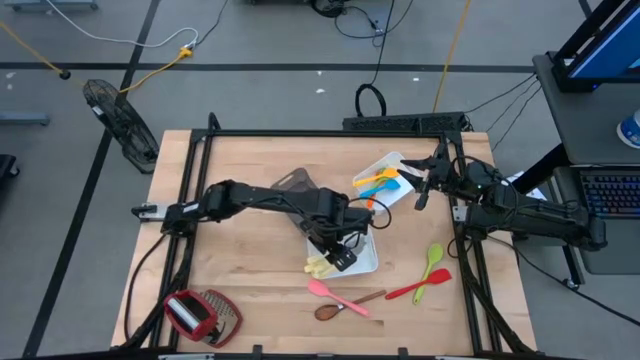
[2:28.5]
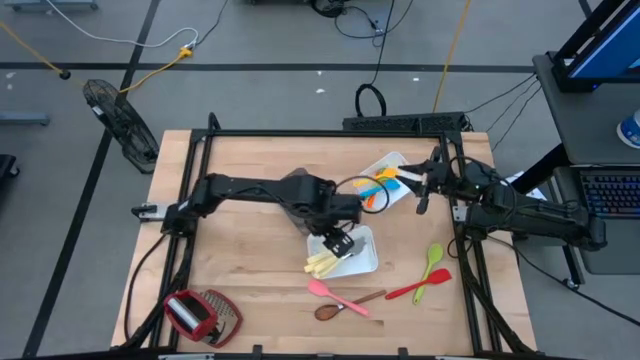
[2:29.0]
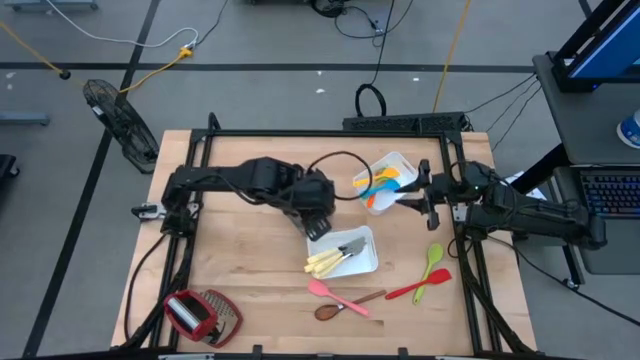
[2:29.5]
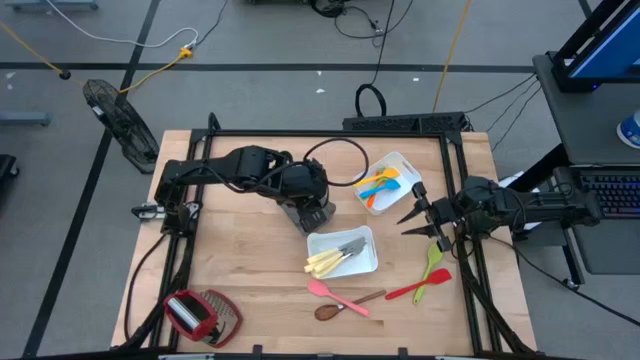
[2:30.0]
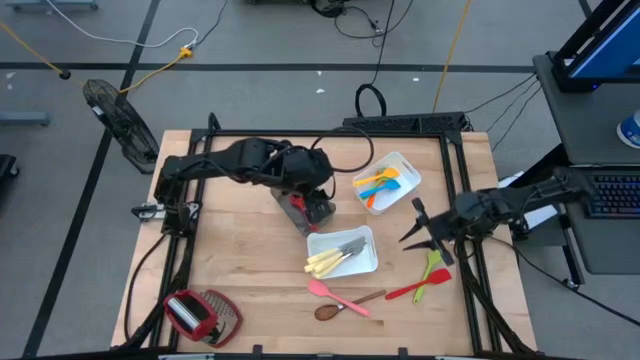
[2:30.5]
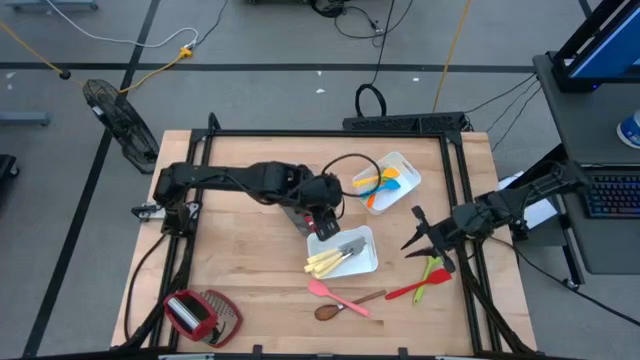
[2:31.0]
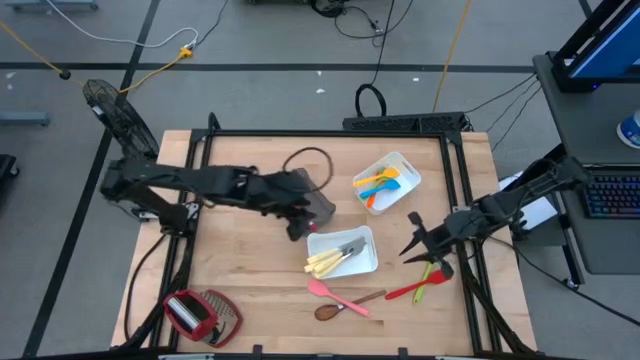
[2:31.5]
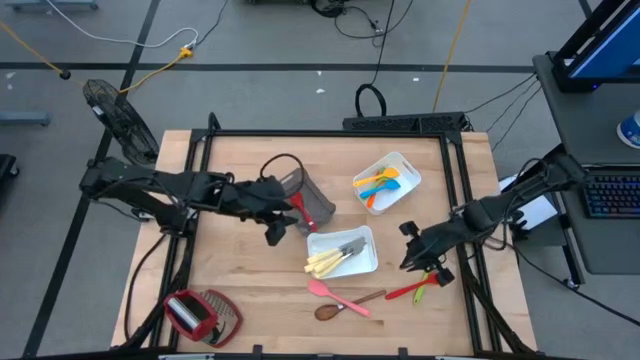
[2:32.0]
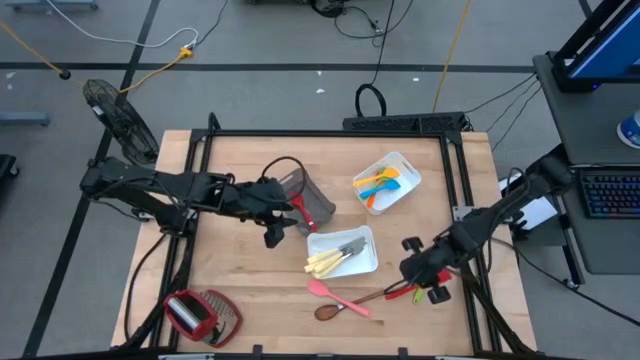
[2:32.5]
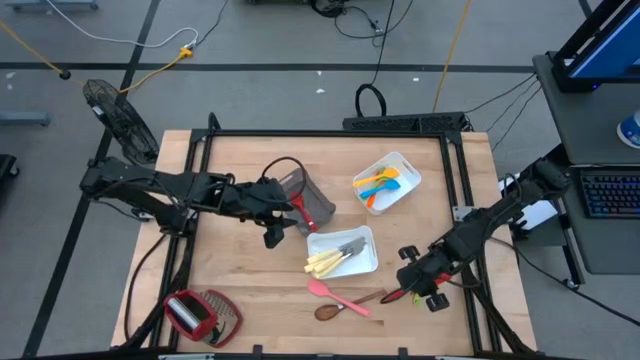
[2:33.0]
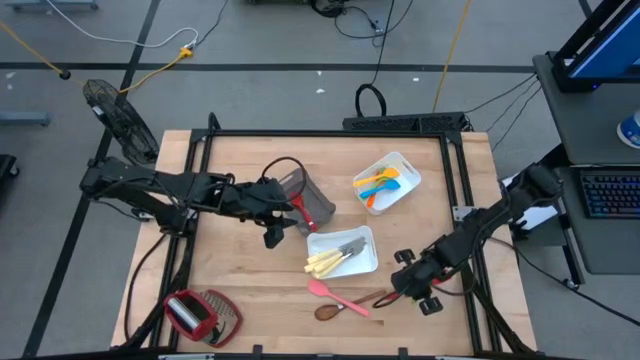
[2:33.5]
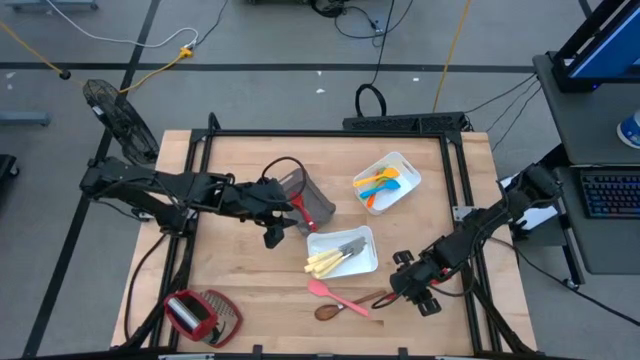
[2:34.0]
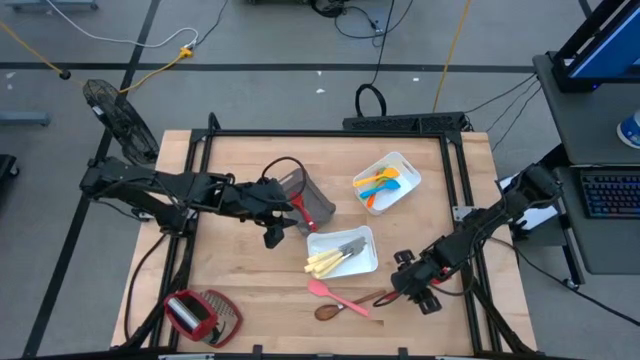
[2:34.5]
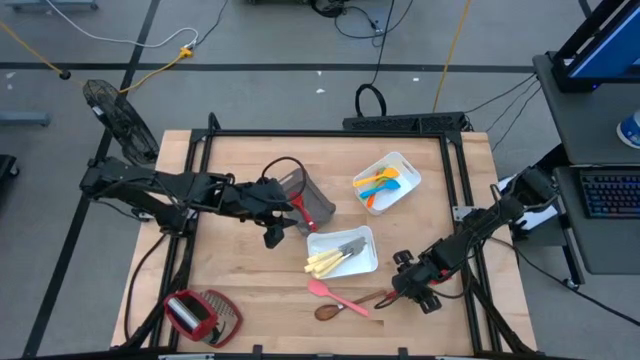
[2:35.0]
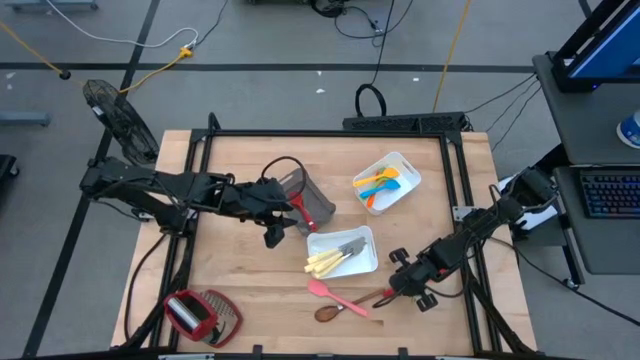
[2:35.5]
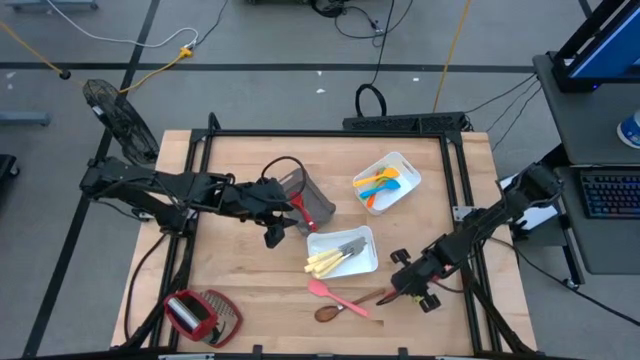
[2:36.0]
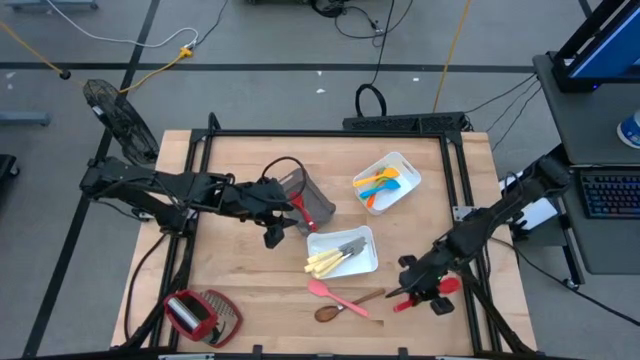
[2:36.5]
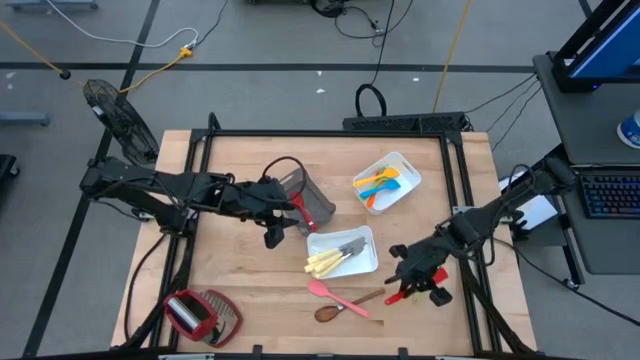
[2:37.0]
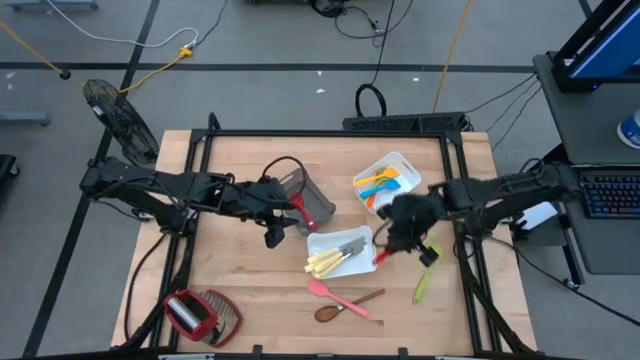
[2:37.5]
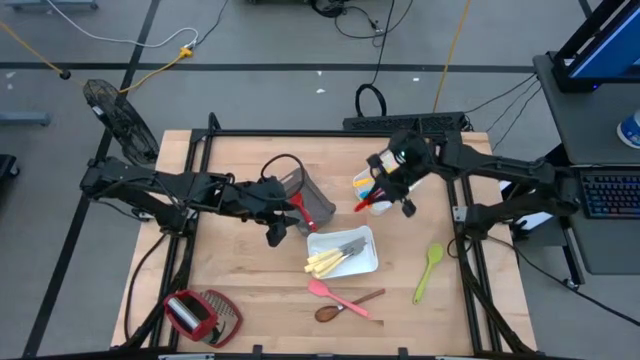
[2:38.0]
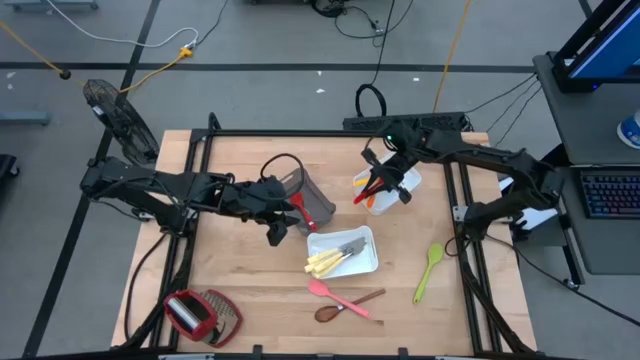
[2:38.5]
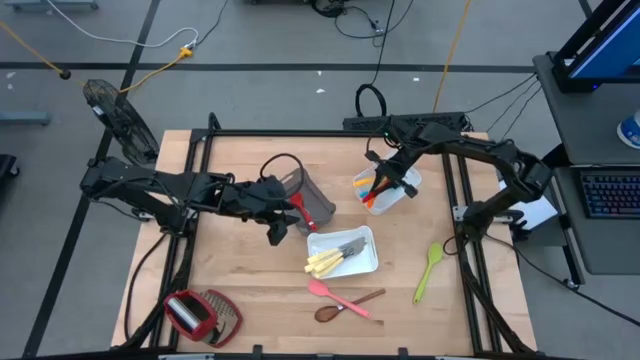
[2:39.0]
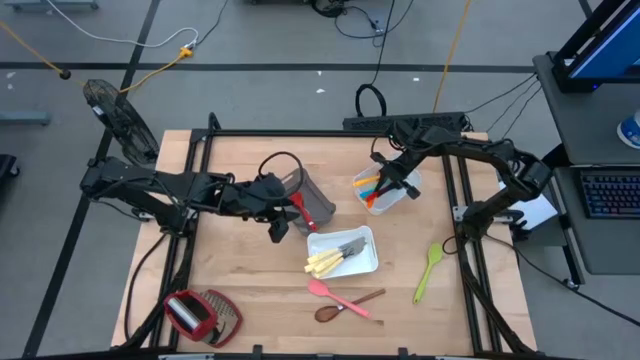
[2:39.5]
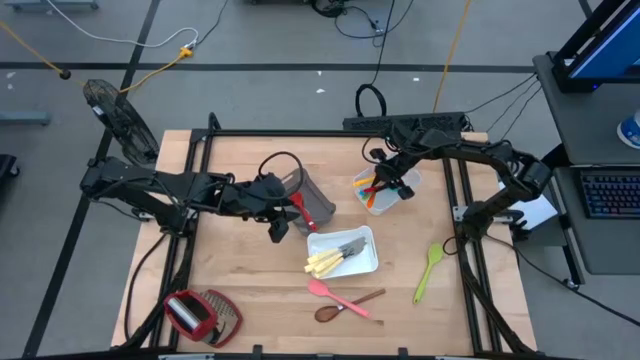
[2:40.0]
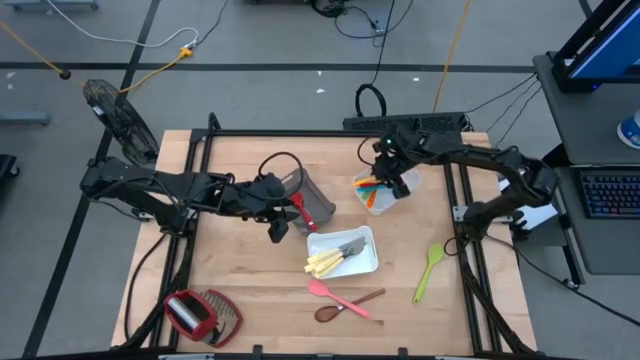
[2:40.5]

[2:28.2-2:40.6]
Task: Pick & Place Kitchen Items
Put the red spatula into the top white bin

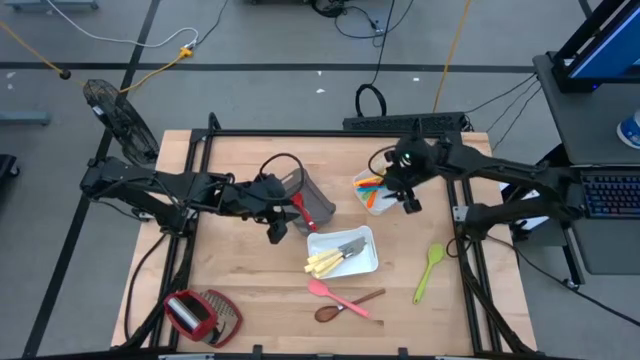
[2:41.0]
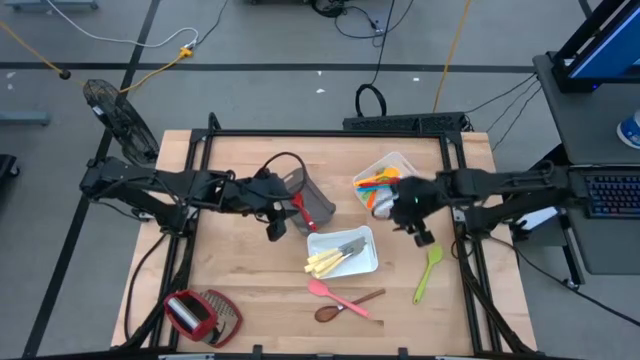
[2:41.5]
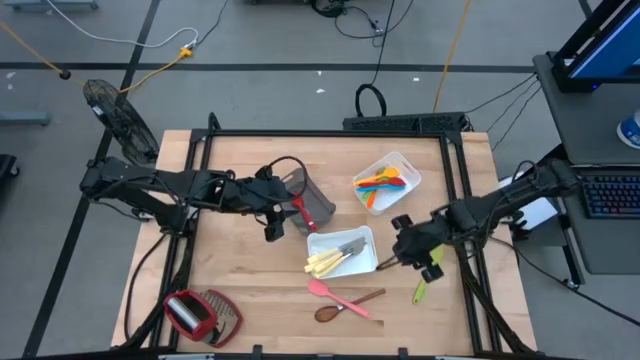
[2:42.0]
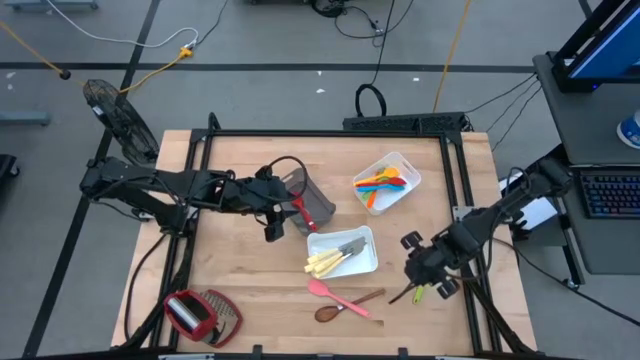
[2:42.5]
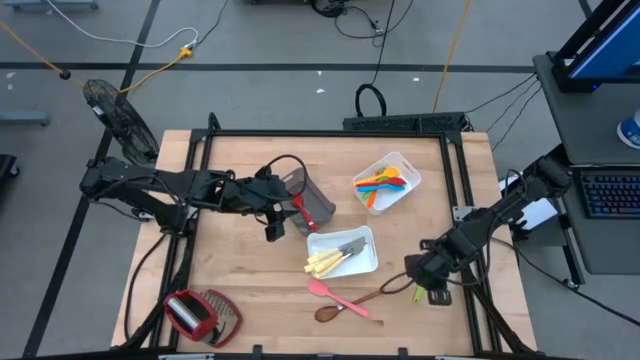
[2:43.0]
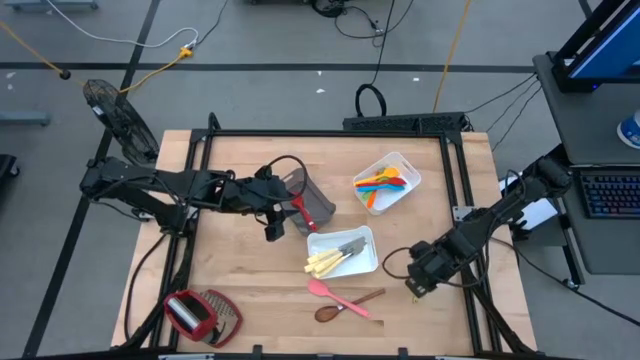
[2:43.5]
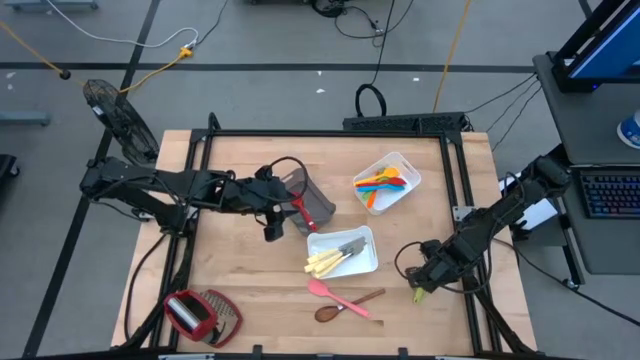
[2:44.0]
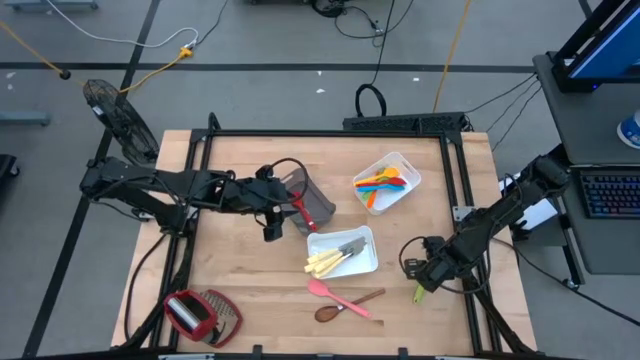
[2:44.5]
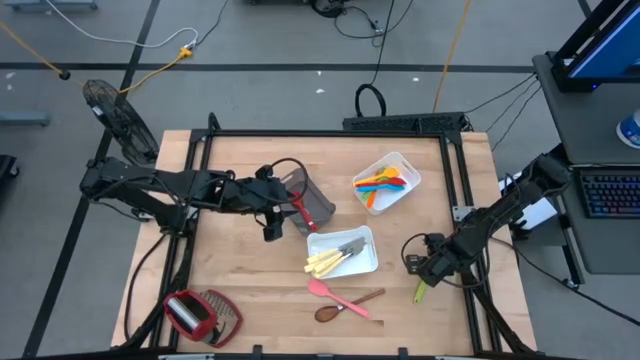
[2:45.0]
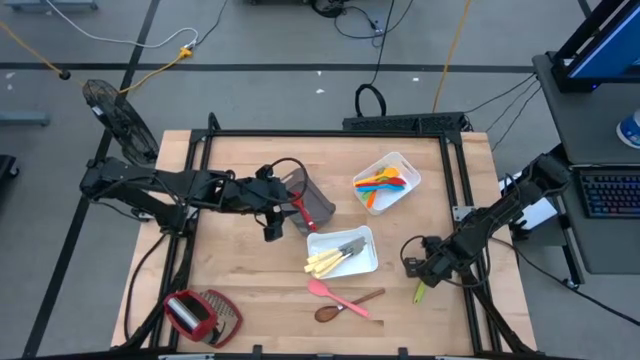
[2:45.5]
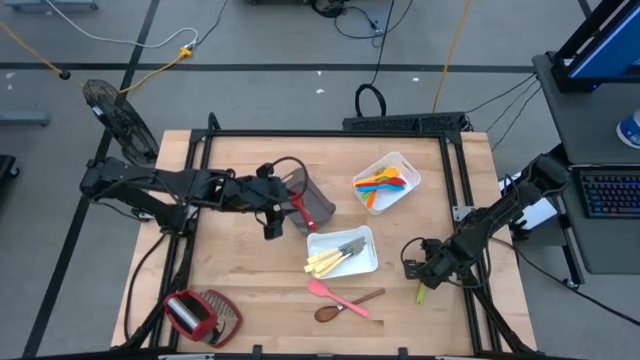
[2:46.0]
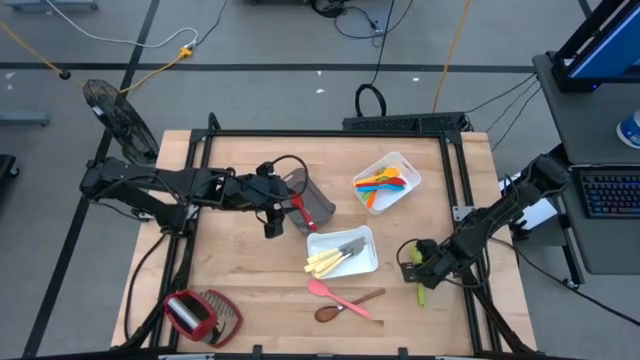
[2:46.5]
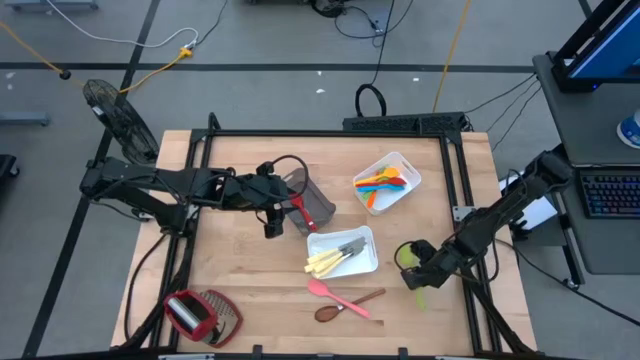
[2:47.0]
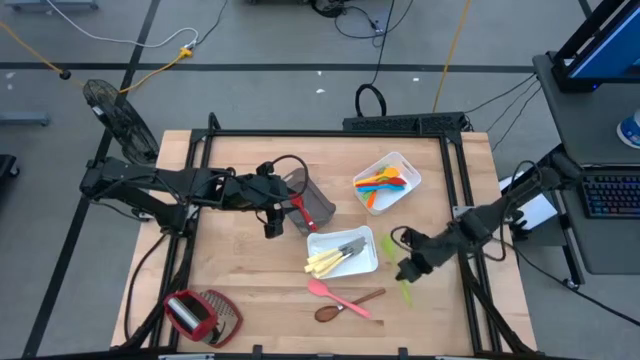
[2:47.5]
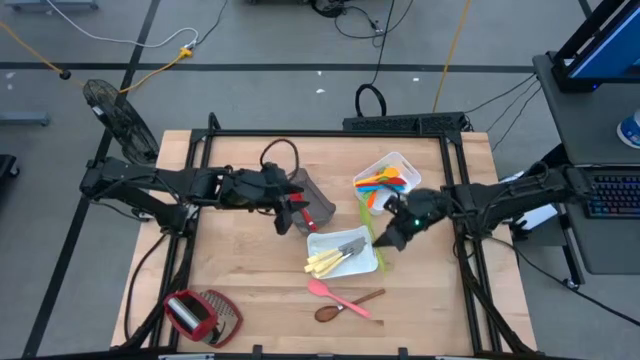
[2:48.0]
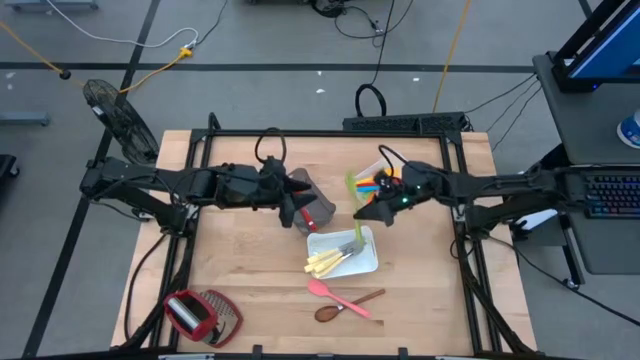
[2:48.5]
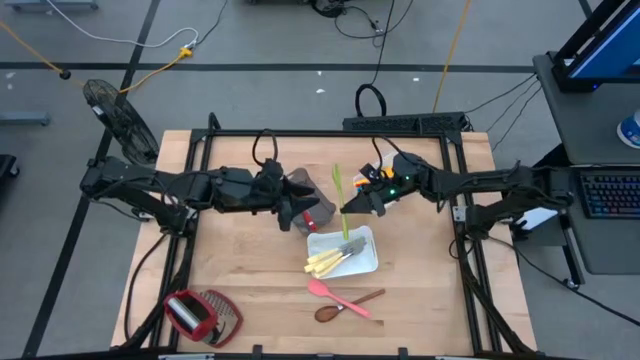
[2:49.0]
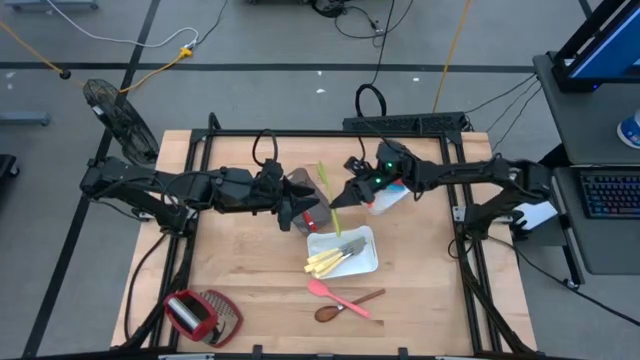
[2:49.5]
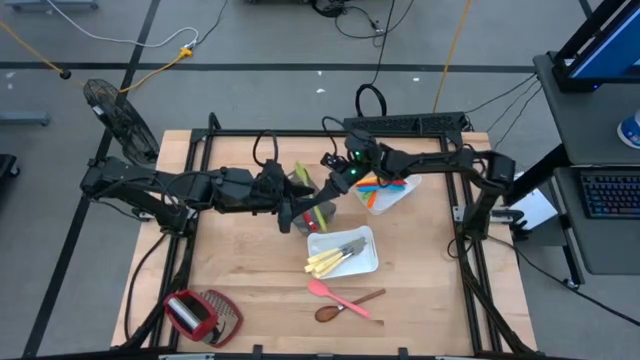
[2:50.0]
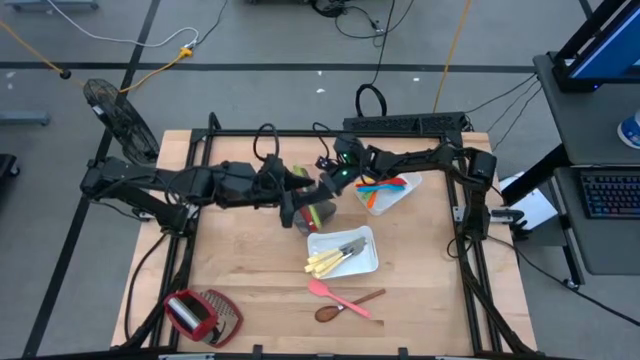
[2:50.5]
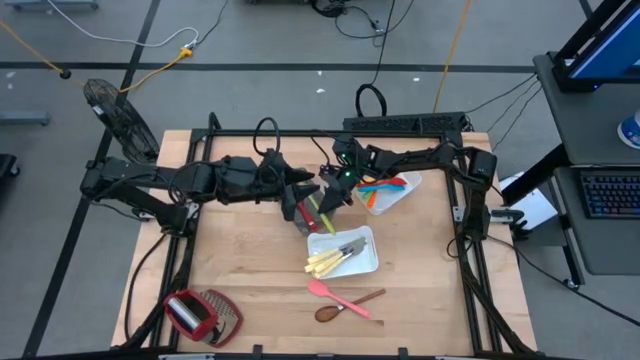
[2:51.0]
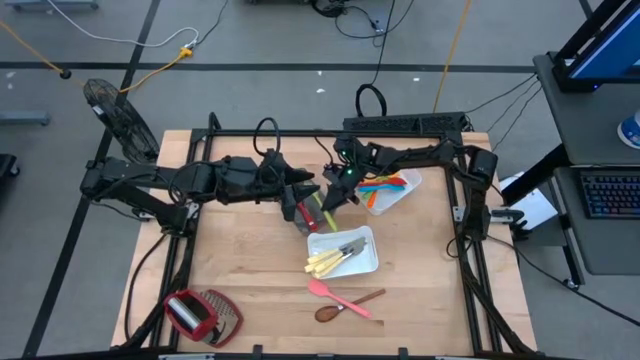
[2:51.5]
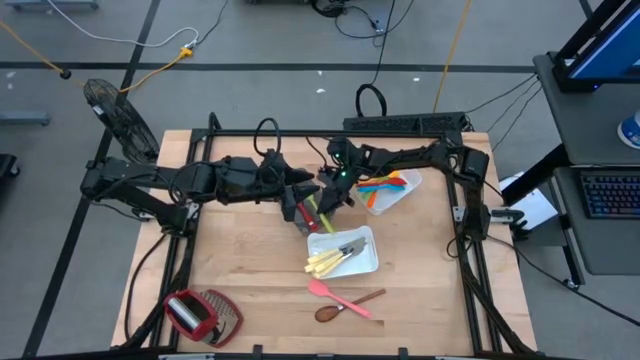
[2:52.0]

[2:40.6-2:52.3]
Put the green serving spoon into the black bin
